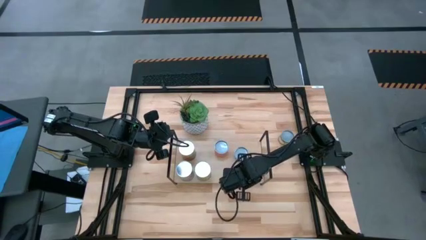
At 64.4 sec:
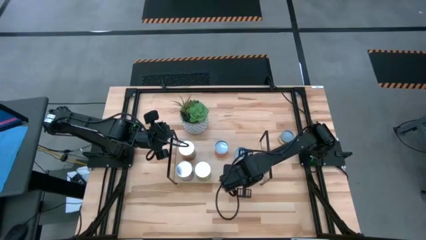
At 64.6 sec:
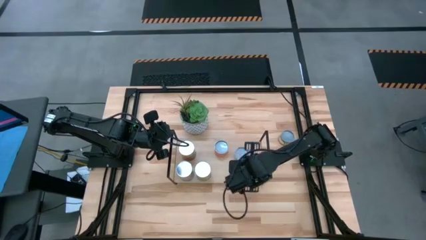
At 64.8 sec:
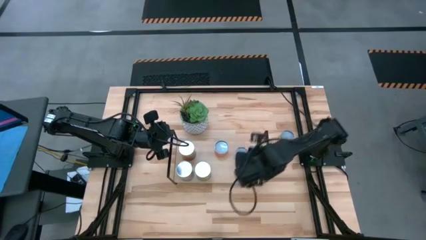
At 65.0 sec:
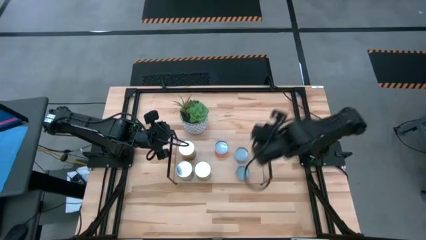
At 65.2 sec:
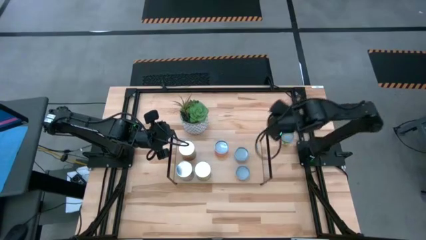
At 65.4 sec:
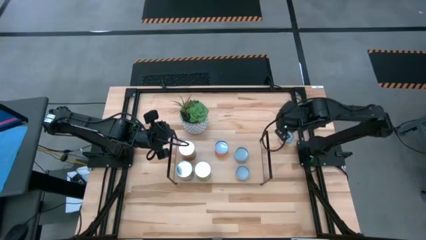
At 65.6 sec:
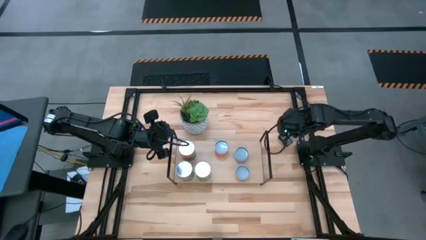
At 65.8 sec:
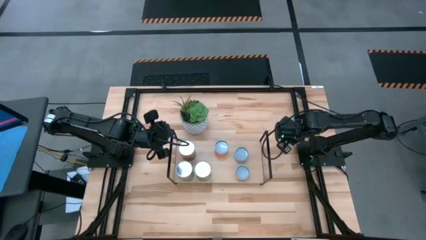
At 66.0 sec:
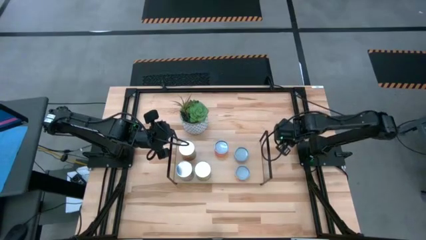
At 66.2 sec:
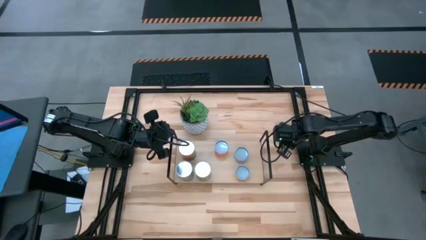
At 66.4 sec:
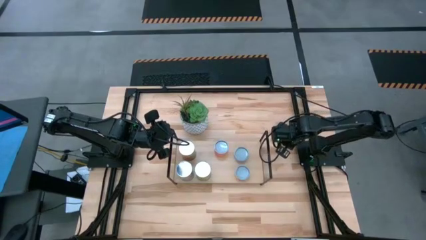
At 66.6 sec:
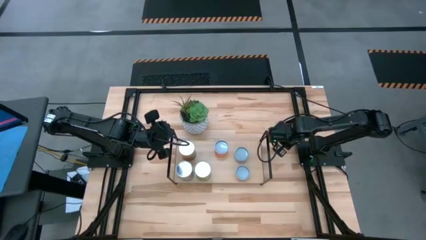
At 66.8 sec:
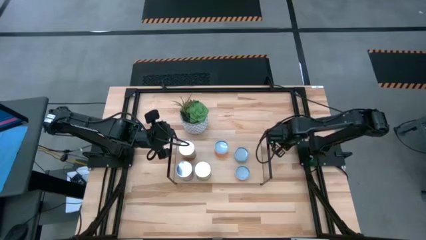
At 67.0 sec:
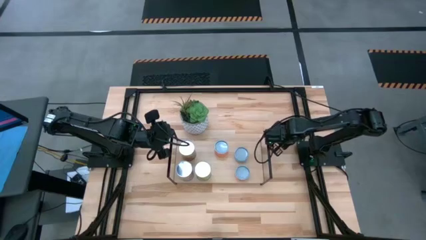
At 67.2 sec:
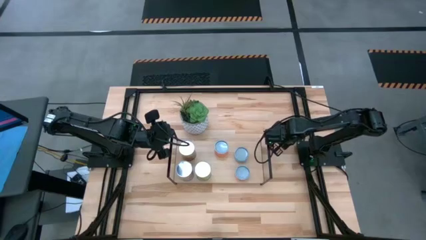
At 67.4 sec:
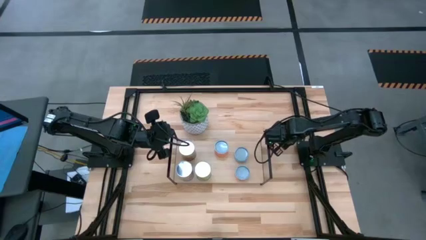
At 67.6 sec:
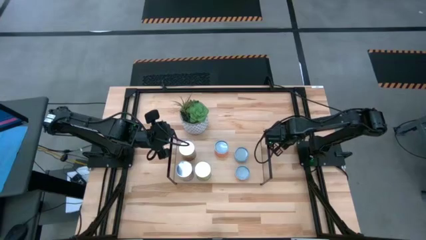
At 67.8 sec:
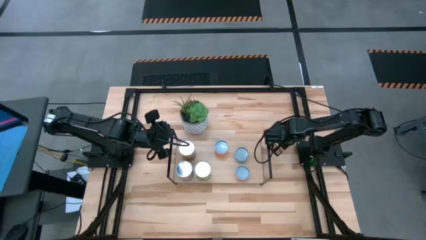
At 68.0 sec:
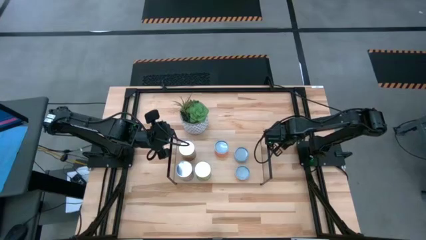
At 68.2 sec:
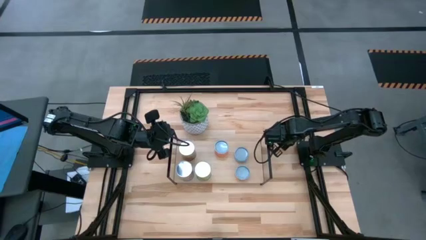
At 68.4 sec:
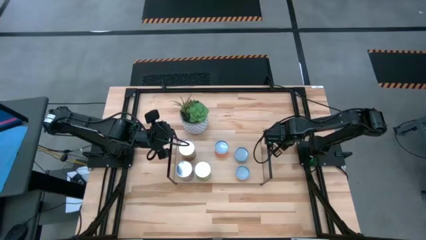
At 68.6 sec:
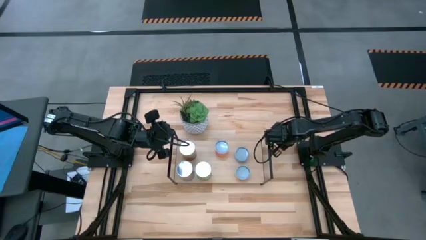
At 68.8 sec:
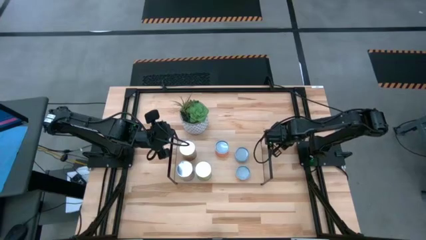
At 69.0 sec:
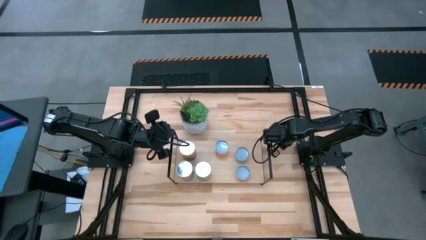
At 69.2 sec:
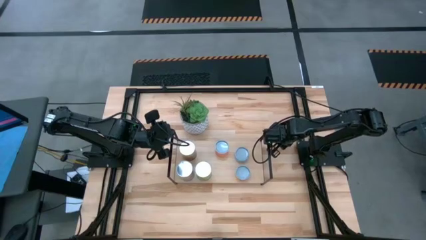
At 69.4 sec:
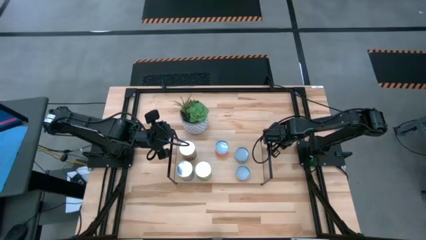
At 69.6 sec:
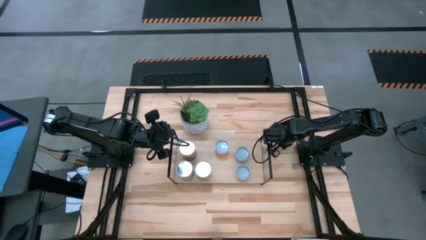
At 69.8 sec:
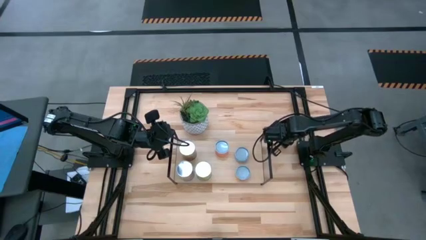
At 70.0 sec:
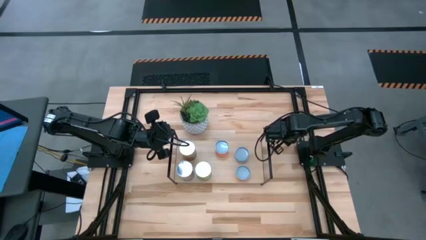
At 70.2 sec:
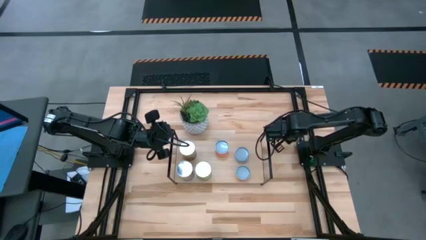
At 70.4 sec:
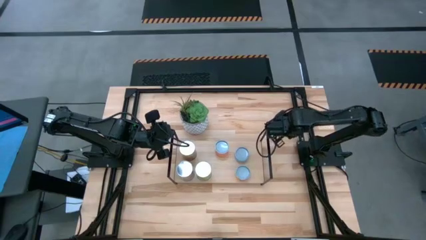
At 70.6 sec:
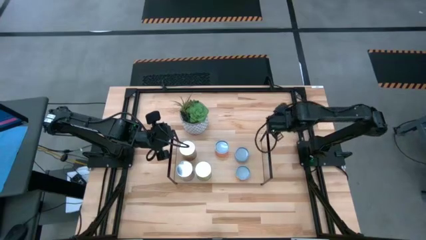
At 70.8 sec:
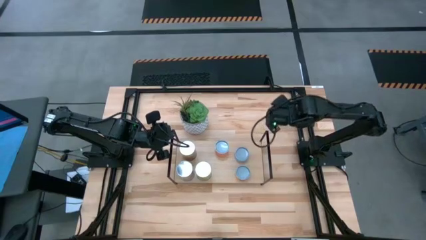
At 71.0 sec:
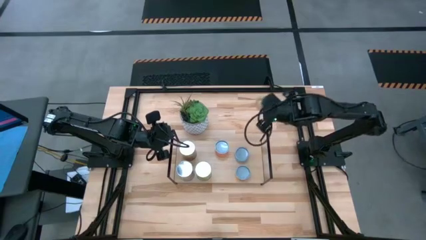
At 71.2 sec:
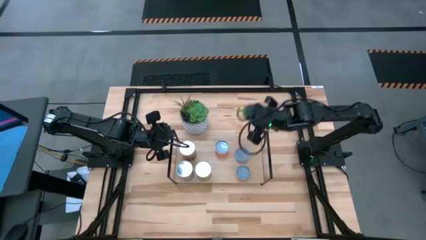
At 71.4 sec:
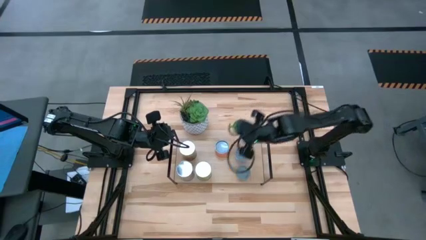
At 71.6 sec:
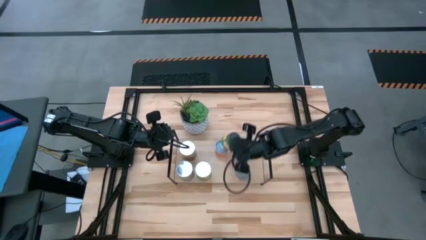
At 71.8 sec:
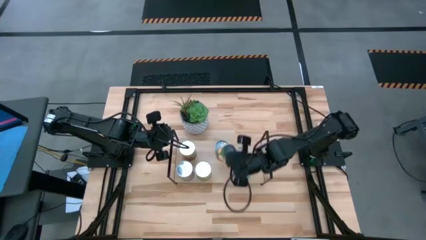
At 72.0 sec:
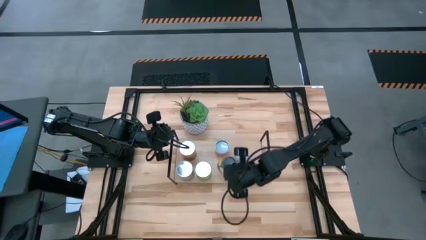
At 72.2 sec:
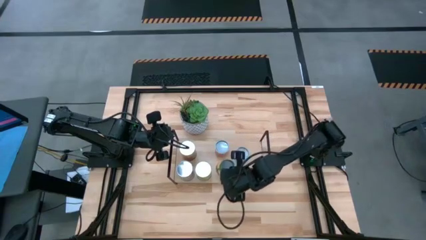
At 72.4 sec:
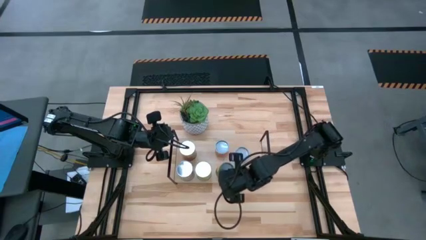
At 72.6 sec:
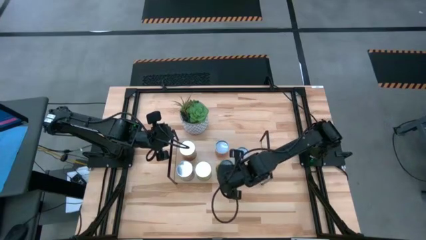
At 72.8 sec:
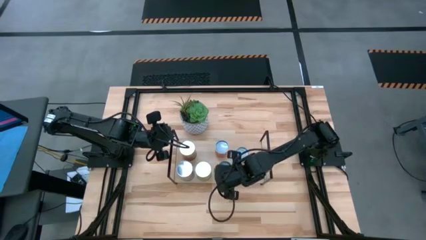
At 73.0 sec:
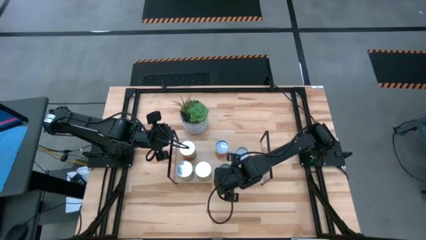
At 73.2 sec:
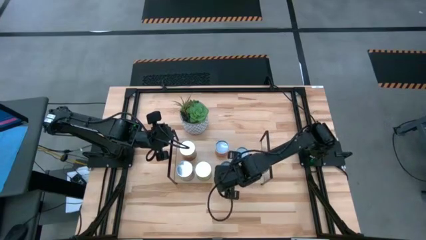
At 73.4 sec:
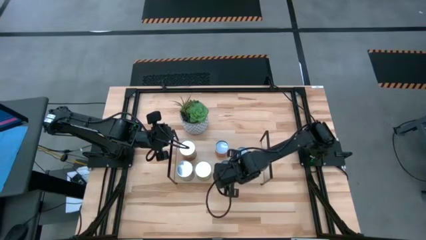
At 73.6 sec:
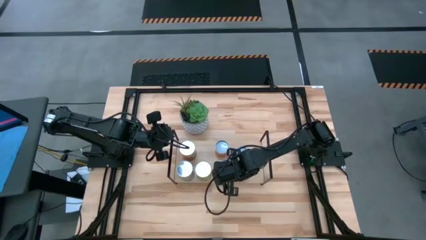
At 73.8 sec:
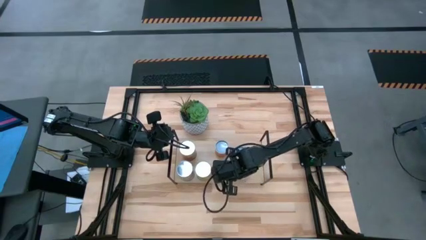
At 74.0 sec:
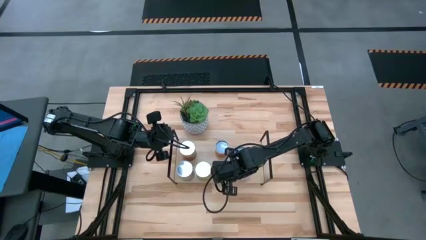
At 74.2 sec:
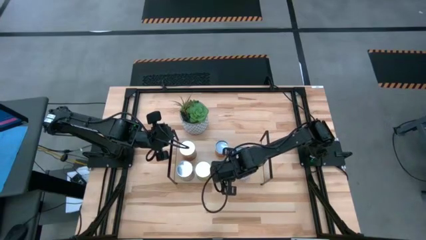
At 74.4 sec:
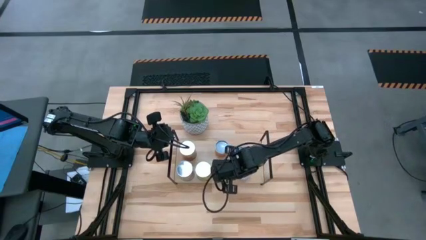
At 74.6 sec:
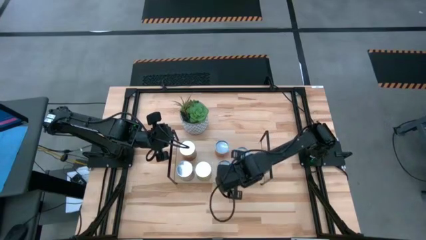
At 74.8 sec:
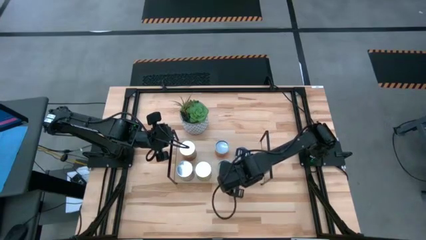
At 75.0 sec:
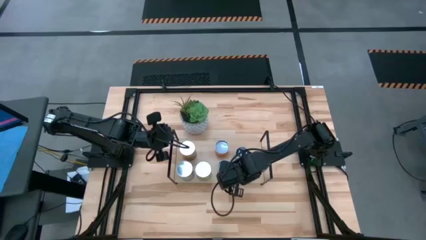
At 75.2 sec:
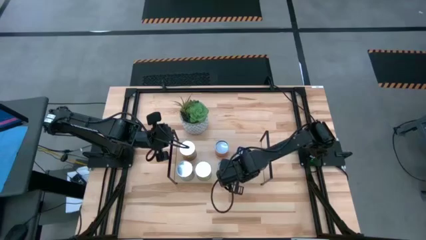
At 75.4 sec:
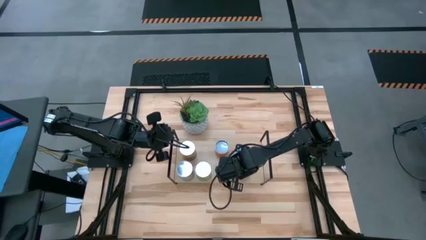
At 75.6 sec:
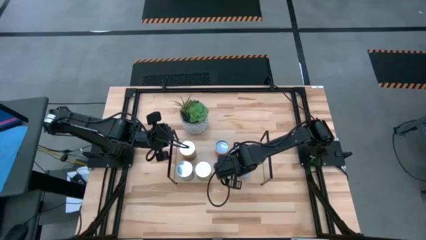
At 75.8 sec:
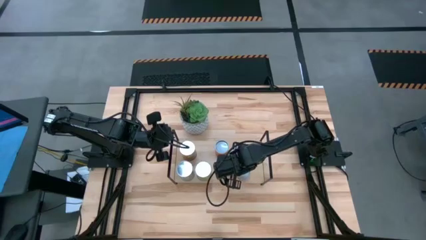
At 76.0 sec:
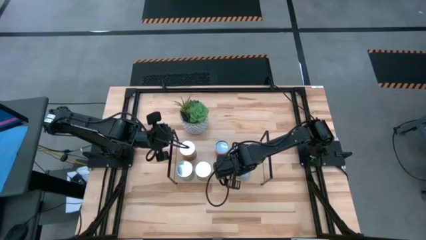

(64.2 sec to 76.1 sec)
Task: Pick and place cans onto a shelf
Put the canned sliced peaches on the shelf

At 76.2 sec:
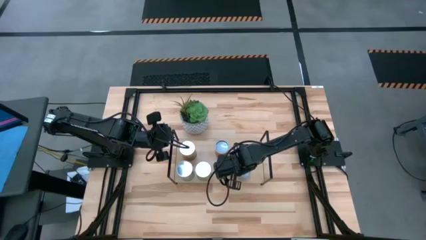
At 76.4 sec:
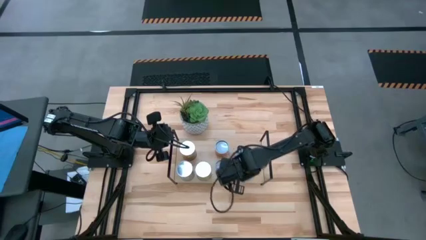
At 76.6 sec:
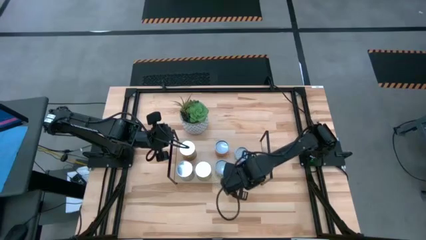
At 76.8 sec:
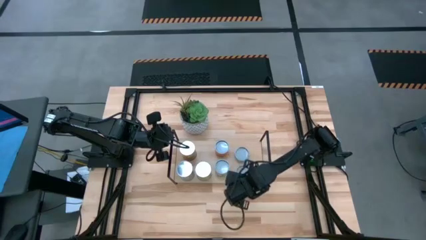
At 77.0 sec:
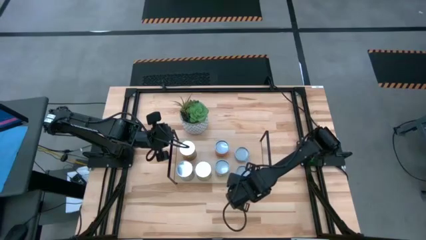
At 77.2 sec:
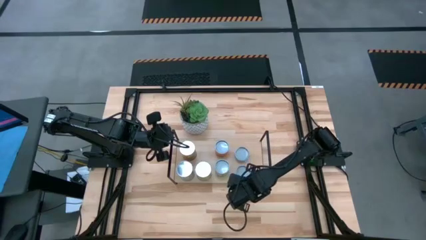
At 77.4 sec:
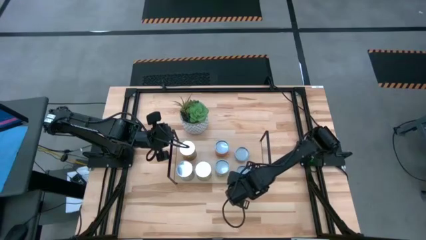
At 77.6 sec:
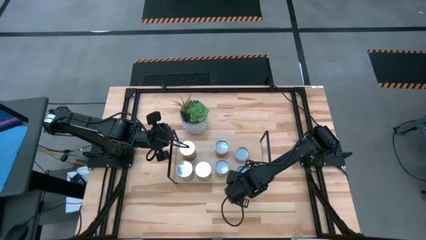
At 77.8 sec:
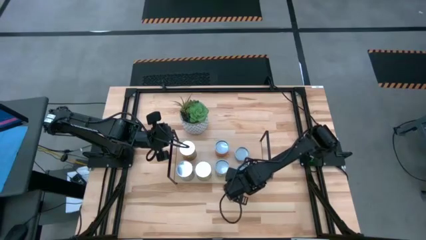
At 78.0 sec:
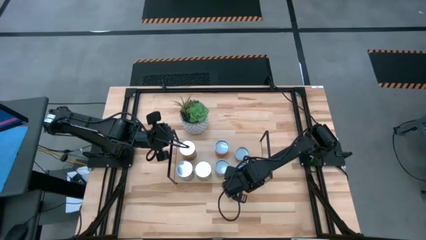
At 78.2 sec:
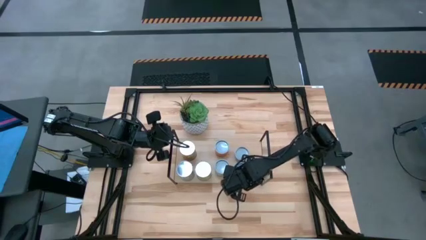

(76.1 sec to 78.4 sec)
Adjust the canned pineapple rings on the shelf

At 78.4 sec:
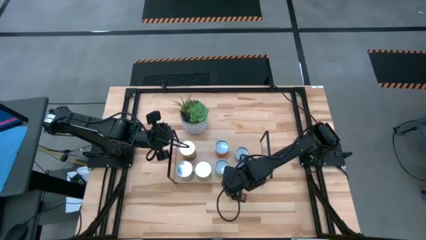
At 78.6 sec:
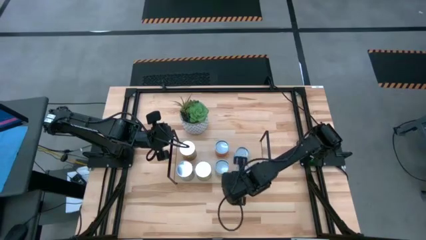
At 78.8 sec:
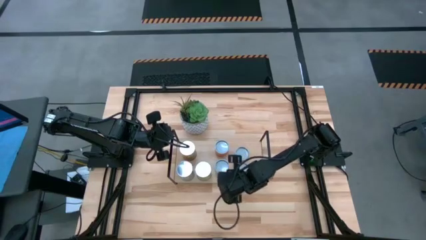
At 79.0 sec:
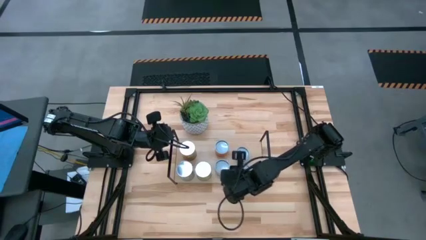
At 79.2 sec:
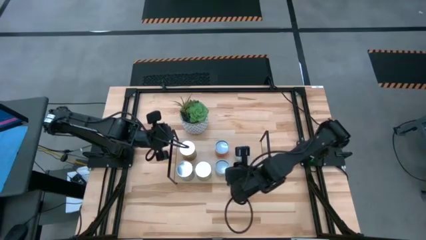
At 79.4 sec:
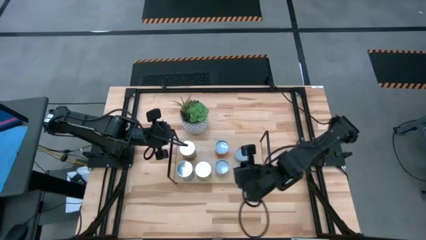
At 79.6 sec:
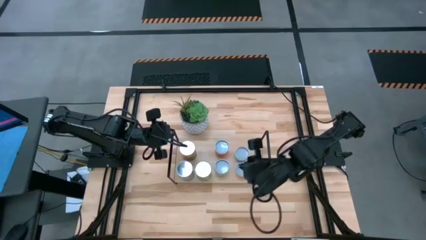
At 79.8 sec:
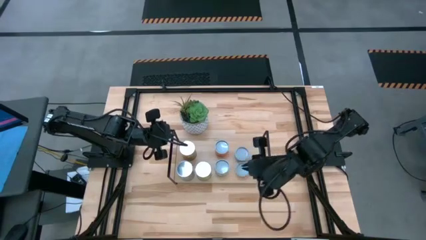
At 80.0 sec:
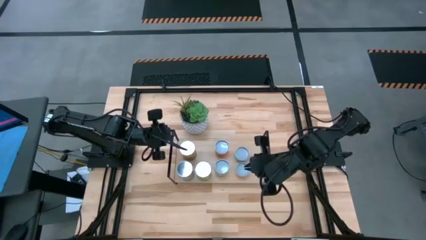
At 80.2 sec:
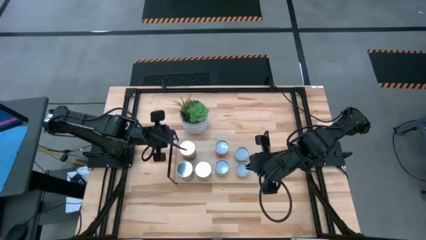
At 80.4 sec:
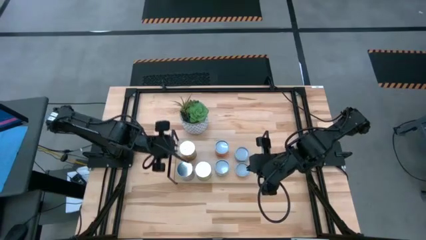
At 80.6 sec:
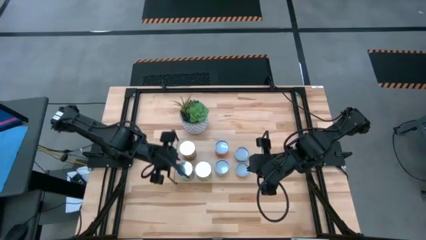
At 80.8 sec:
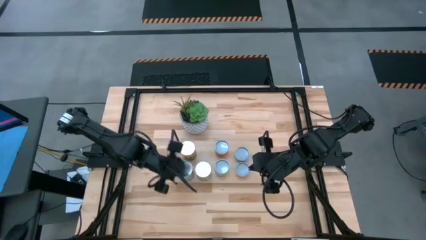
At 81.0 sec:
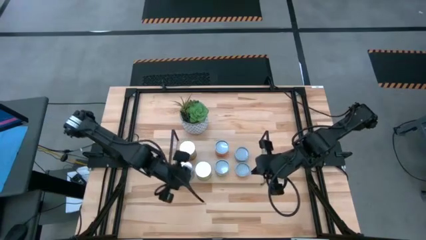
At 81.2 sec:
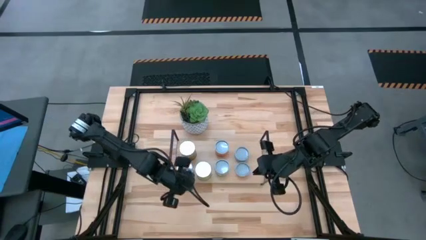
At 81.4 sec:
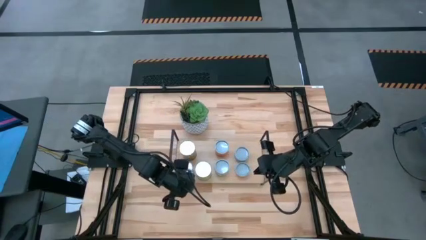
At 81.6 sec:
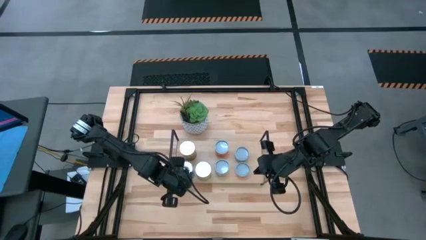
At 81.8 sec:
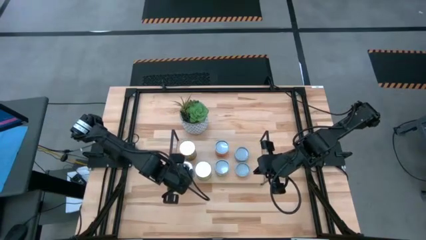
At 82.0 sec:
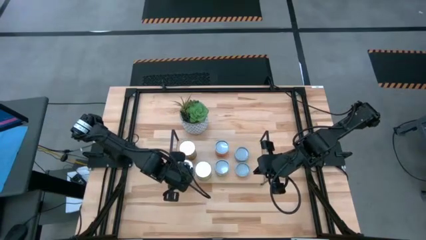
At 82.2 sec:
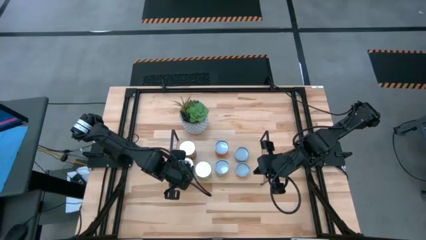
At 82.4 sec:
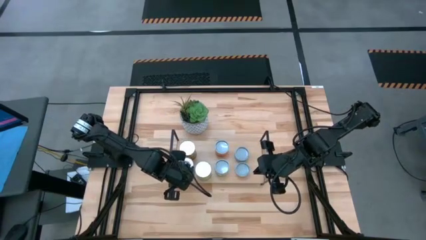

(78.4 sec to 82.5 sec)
Adjust the canned tomatoes on the shelf
